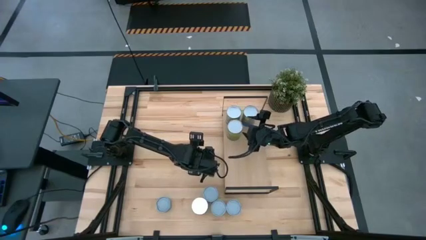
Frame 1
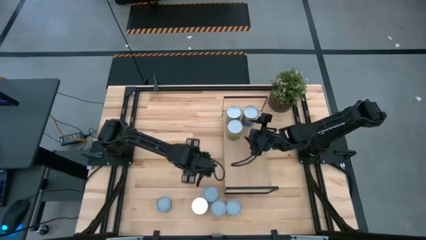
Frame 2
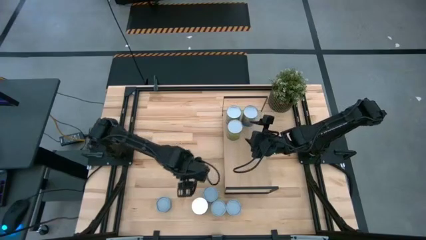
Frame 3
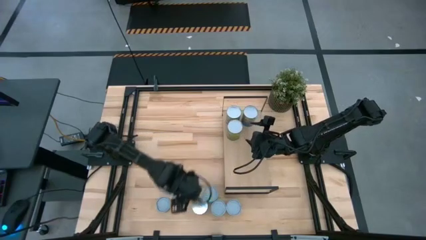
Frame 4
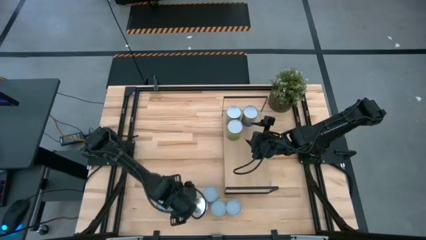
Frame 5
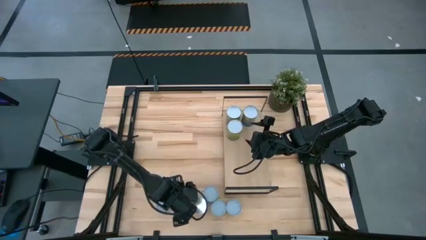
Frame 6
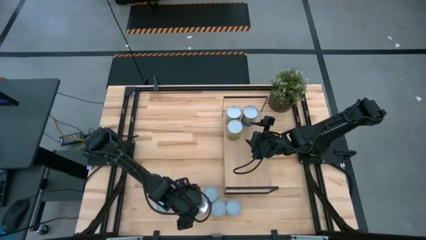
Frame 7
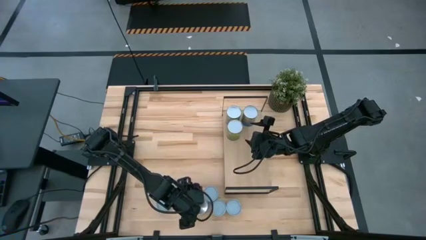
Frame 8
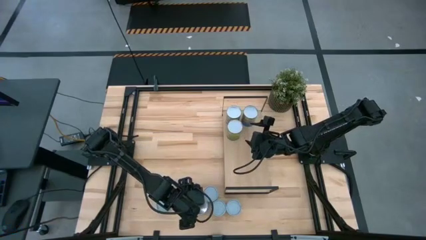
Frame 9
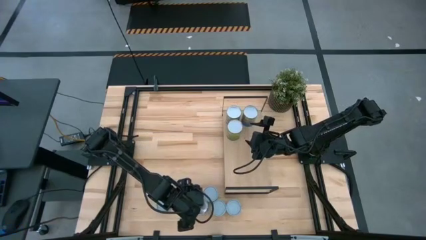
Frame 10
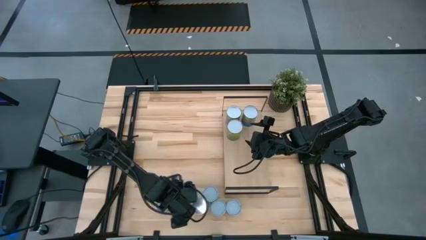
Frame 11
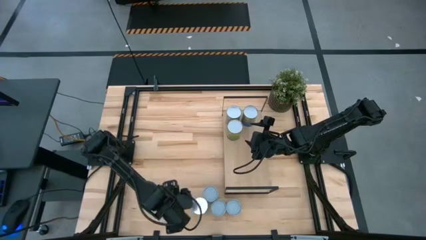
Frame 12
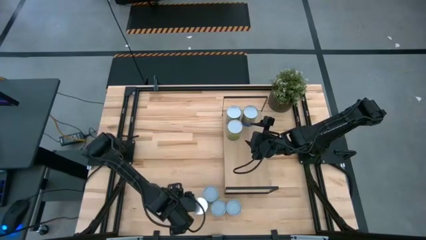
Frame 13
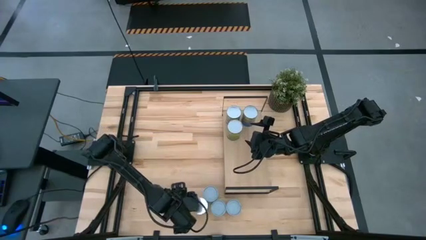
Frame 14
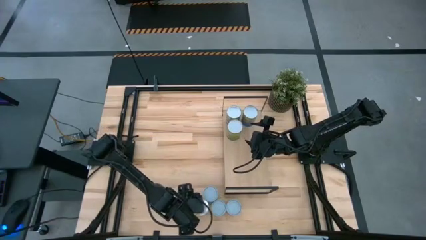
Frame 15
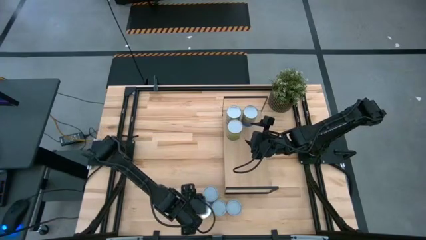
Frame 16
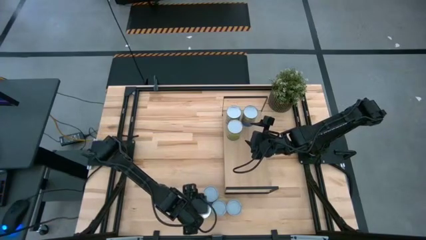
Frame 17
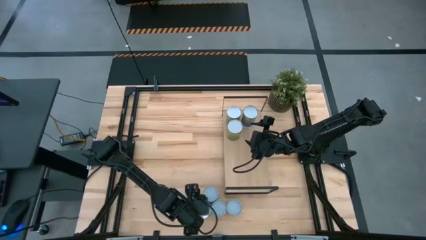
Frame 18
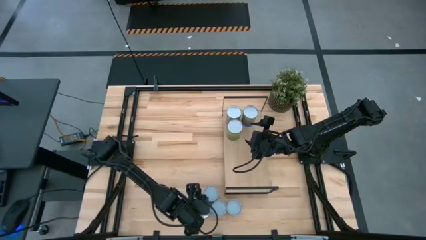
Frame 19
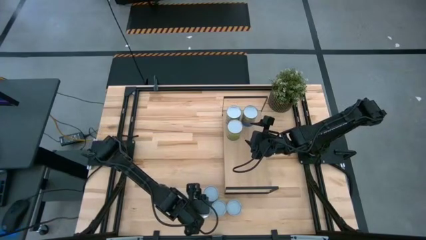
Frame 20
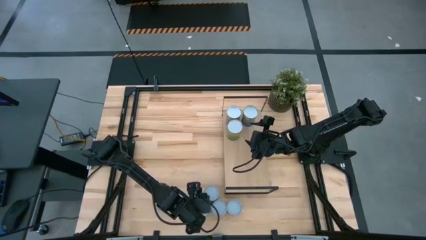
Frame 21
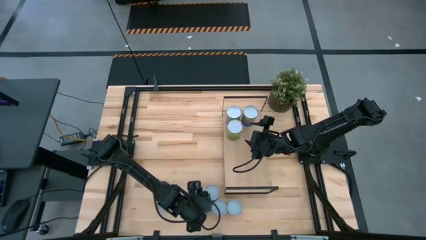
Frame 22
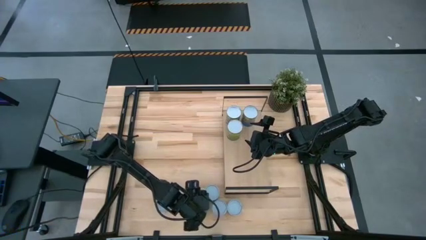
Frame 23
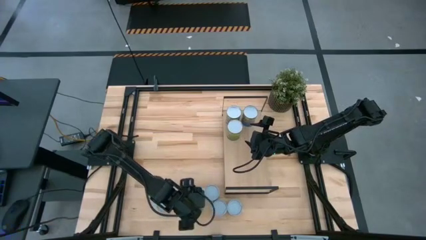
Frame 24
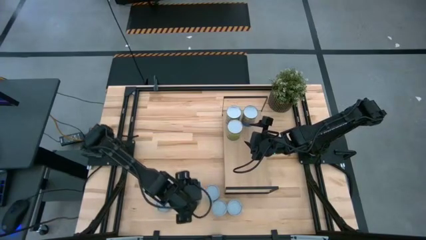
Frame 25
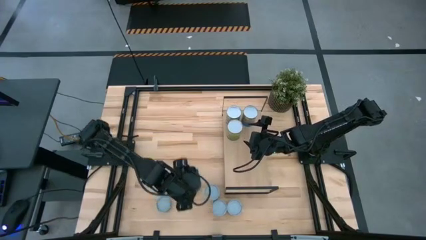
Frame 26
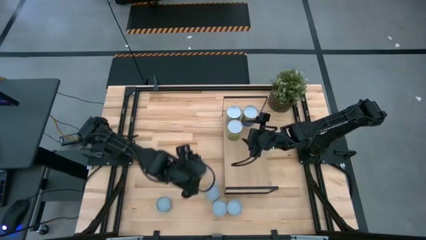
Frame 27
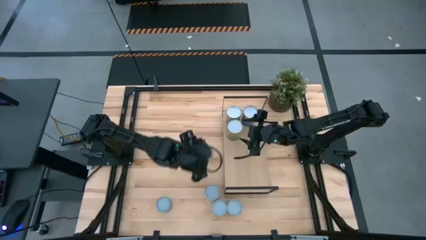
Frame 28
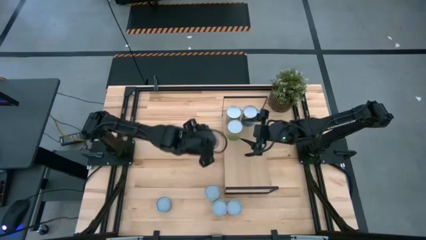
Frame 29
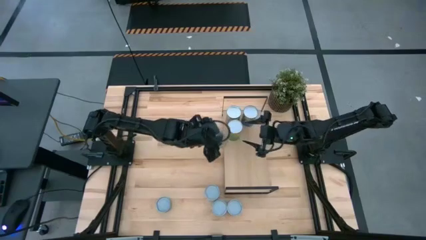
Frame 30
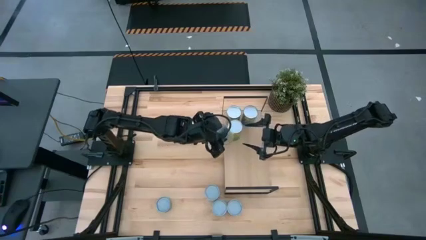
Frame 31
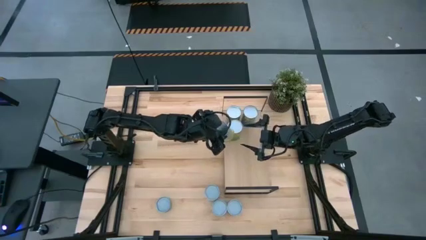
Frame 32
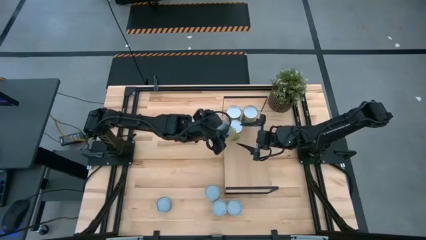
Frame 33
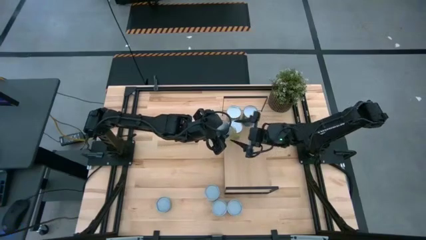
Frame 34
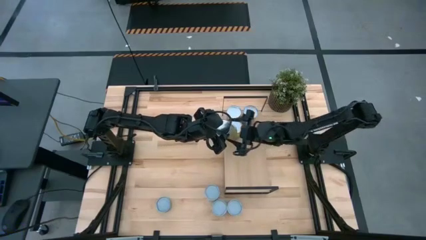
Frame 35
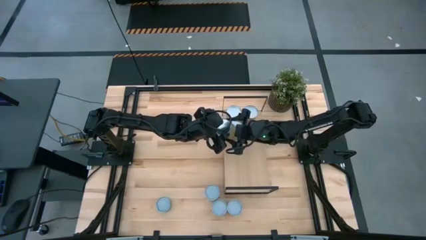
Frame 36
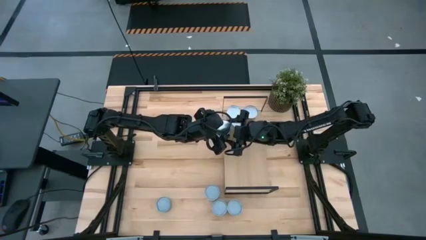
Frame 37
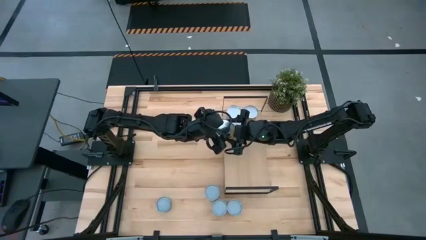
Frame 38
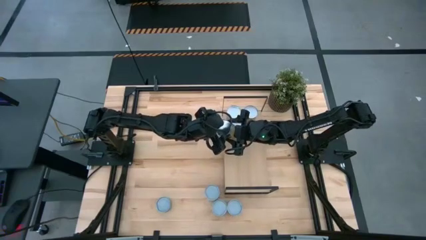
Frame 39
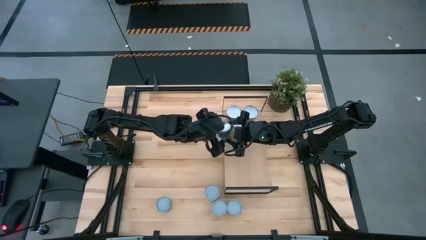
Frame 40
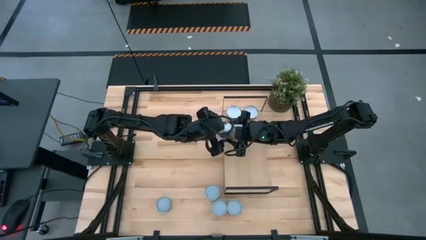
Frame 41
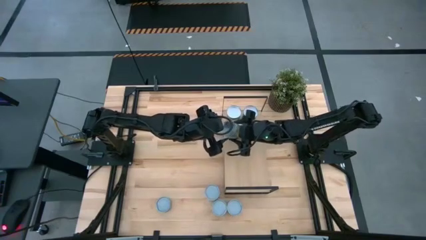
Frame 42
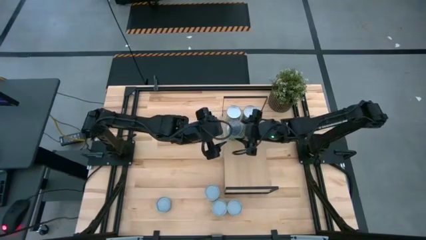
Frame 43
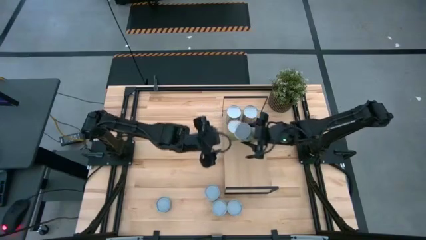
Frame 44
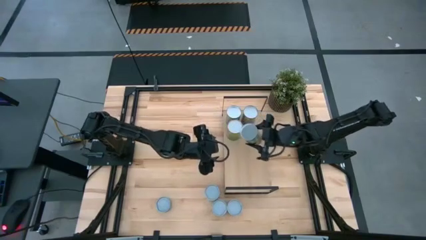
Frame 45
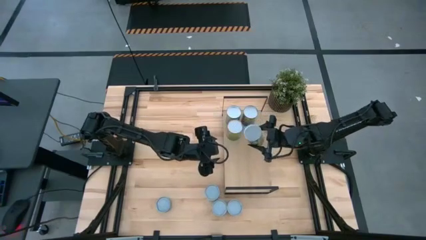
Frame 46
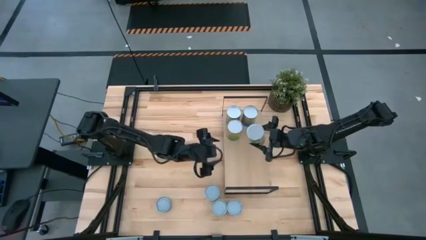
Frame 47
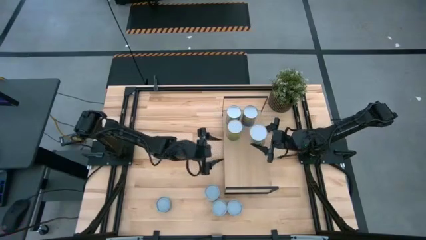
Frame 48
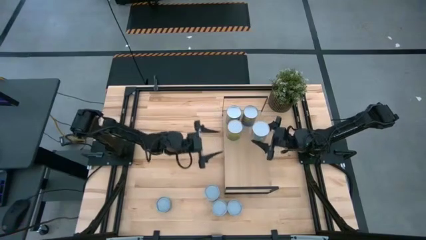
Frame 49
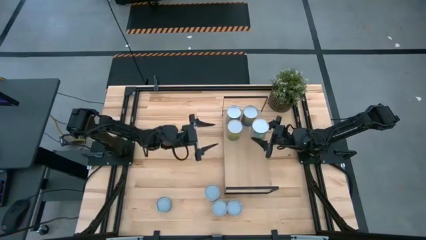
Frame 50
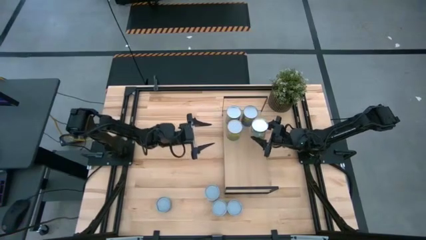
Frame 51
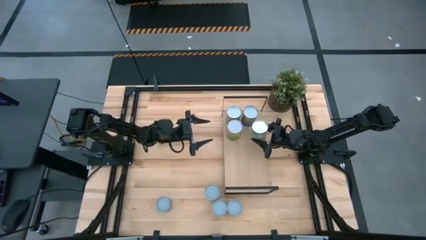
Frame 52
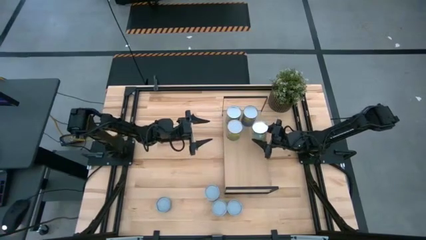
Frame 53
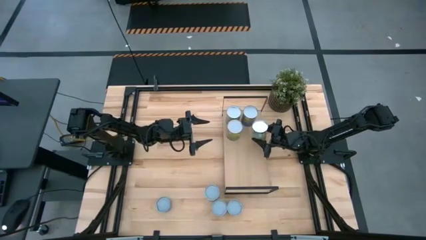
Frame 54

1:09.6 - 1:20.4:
Task: Pick and place cans onto a shelf
Put the canned carrots on the shelf
